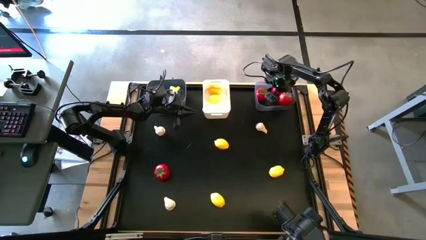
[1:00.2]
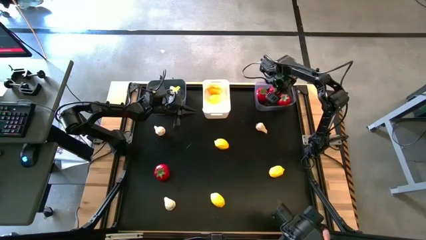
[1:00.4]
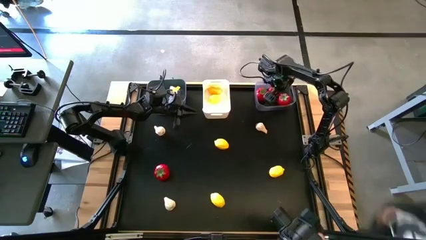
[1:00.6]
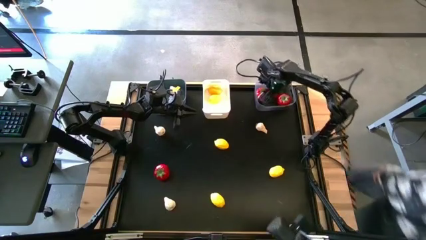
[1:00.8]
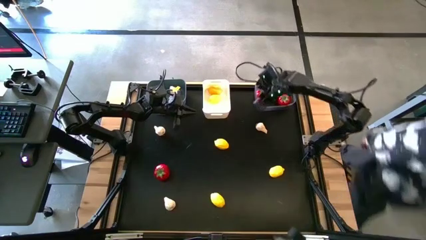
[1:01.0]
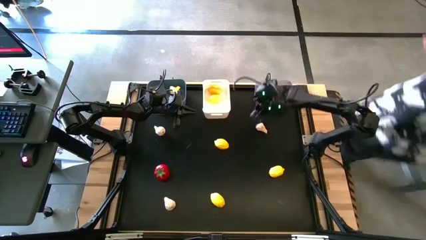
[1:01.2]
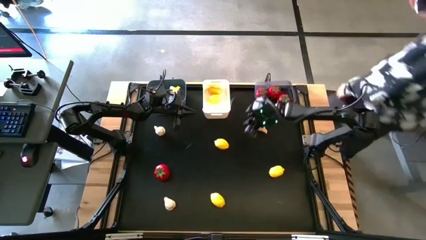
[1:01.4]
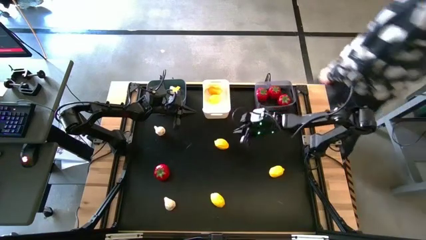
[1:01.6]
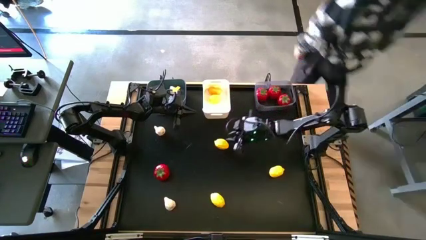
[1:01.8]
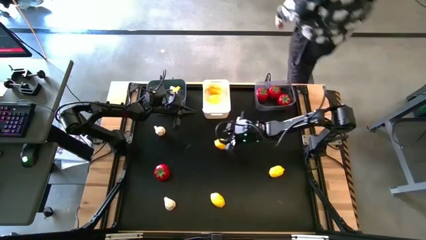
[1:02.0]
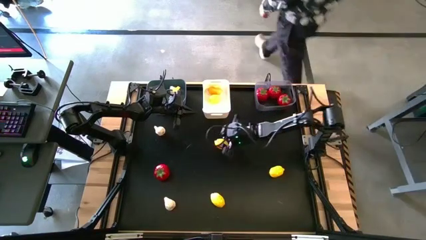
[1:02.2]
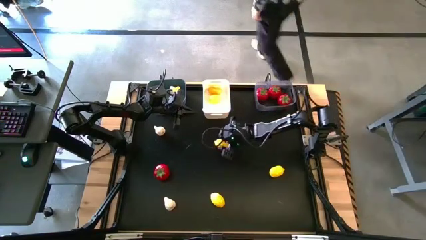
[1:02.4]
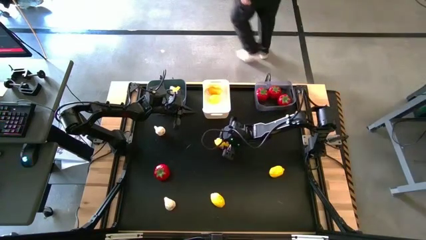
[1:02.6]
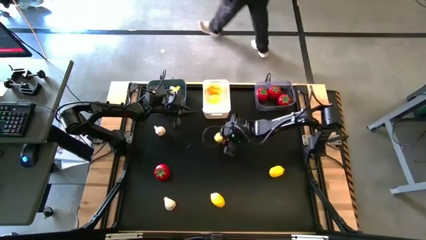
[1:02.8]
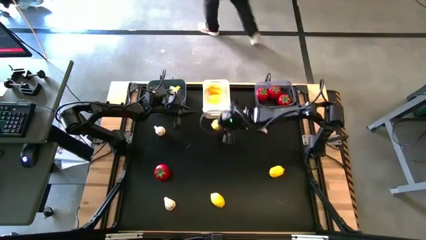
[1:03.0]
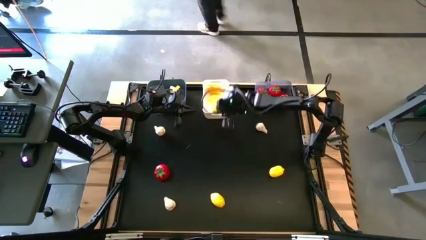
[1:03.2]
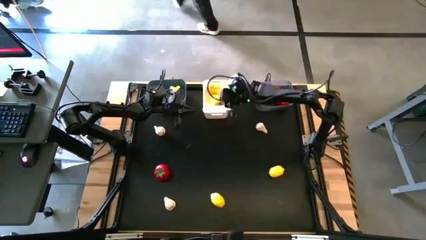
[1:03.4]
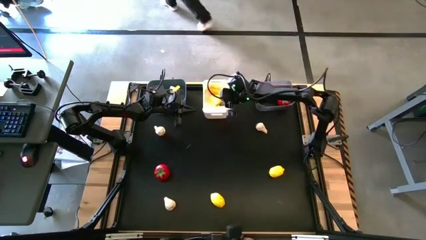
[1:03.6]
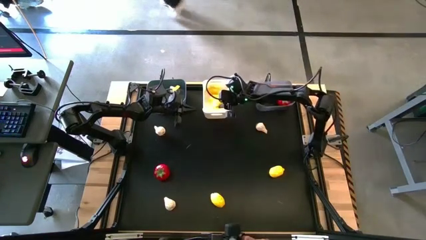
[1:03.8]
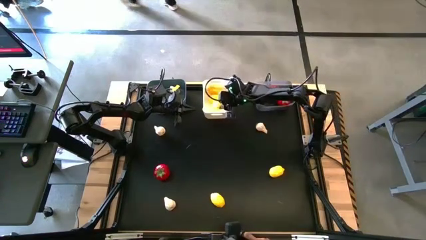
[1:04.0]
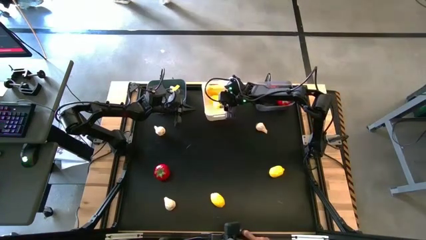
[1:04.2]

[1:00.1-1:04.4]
Task: Sort produce into baskets
Put the yellow lemon into the white bin

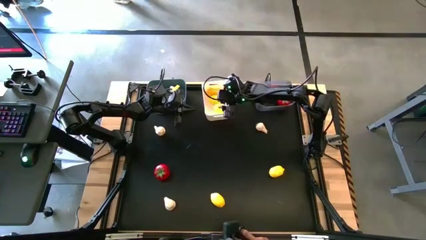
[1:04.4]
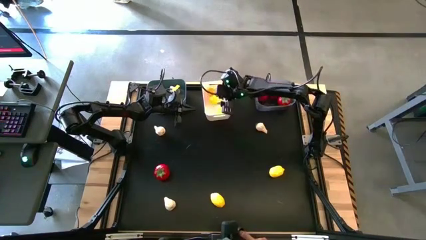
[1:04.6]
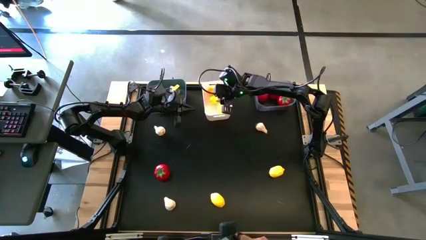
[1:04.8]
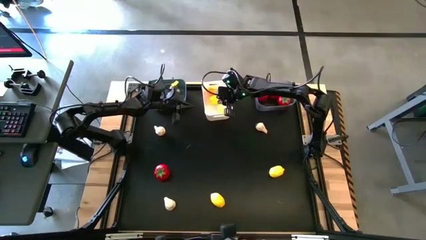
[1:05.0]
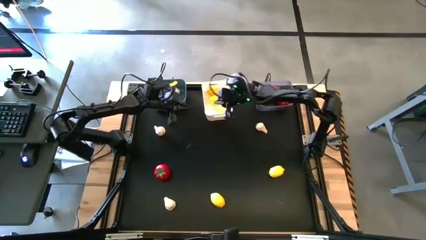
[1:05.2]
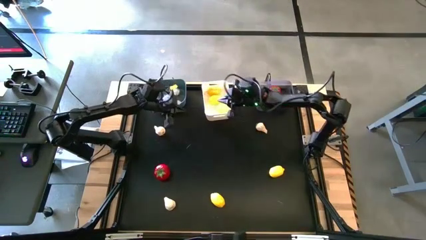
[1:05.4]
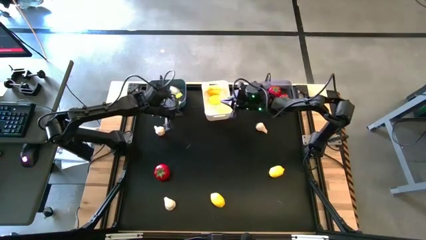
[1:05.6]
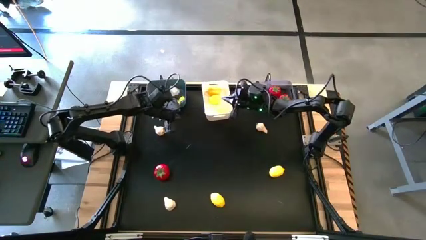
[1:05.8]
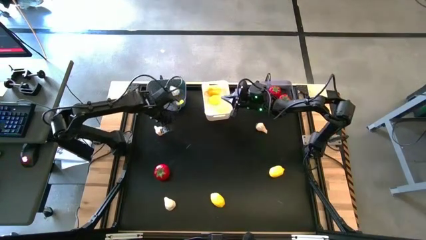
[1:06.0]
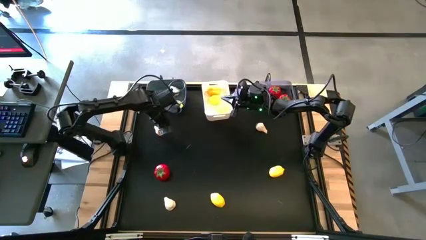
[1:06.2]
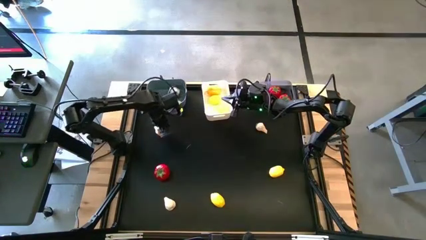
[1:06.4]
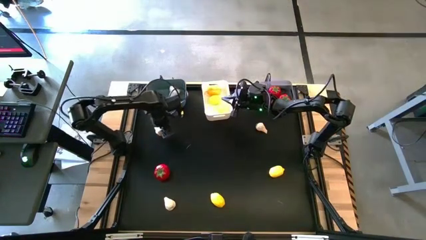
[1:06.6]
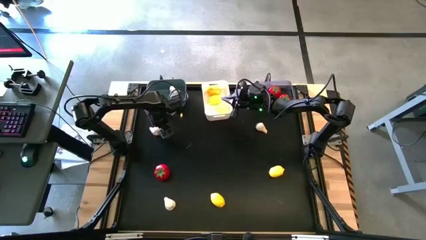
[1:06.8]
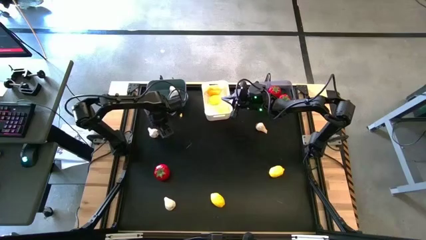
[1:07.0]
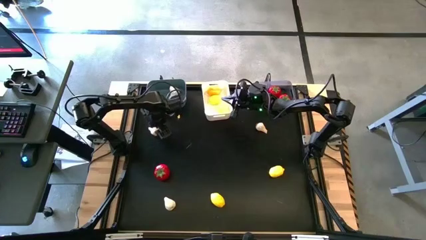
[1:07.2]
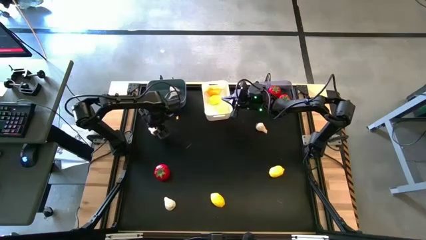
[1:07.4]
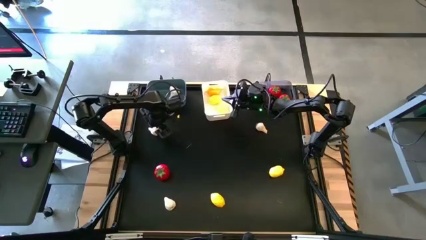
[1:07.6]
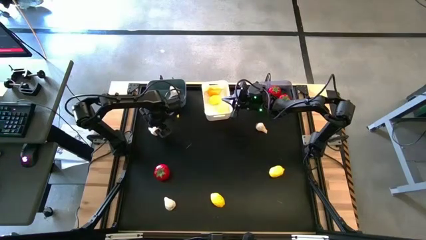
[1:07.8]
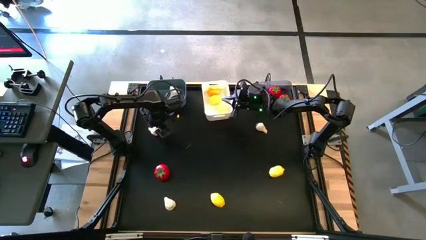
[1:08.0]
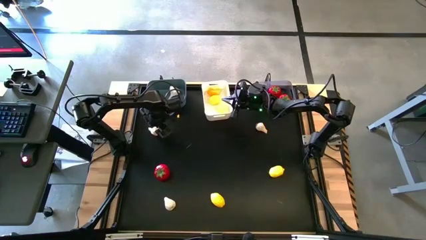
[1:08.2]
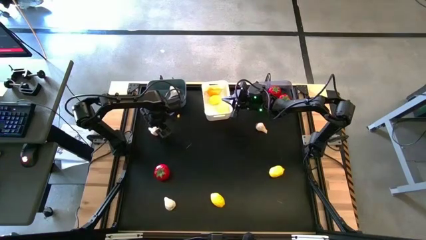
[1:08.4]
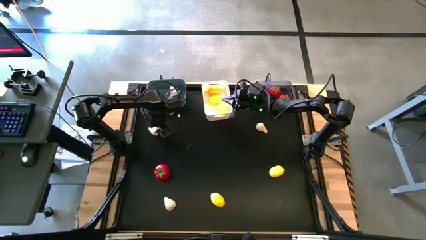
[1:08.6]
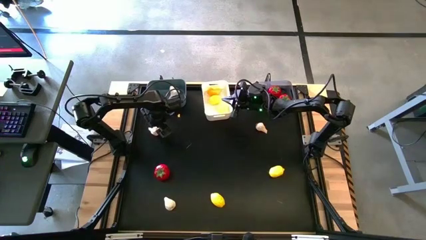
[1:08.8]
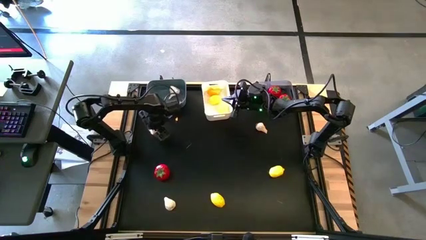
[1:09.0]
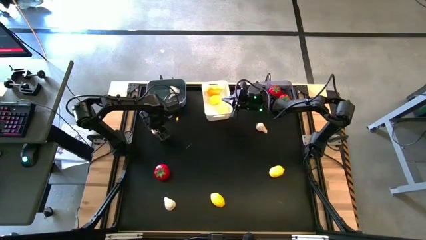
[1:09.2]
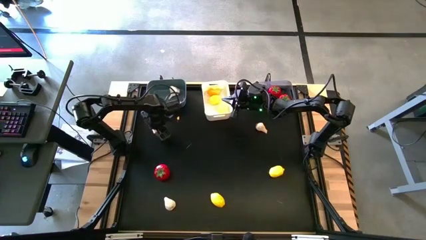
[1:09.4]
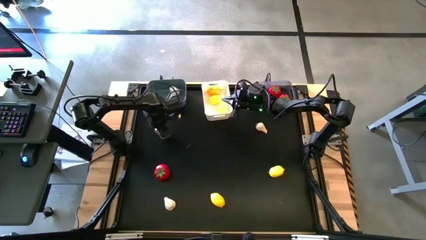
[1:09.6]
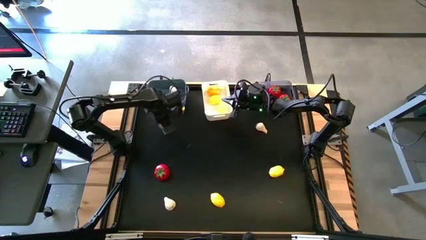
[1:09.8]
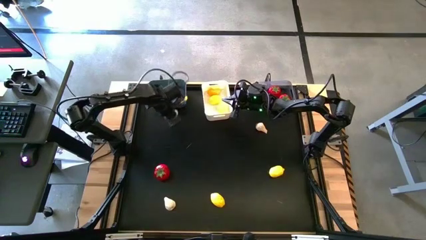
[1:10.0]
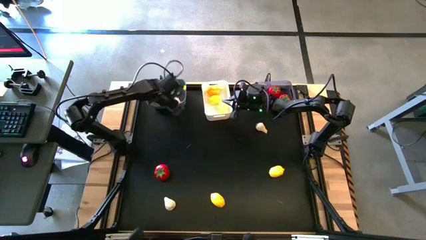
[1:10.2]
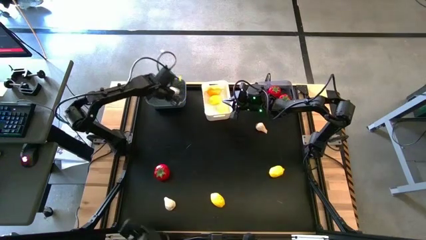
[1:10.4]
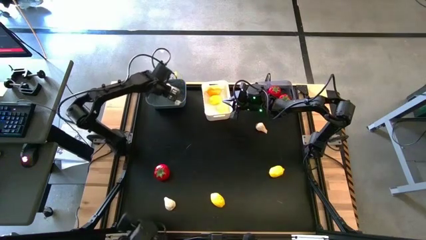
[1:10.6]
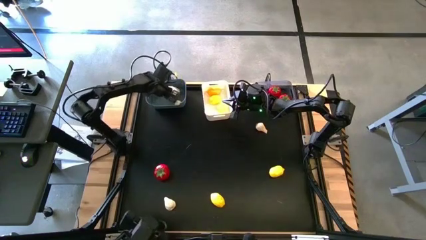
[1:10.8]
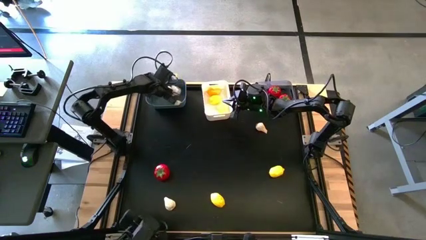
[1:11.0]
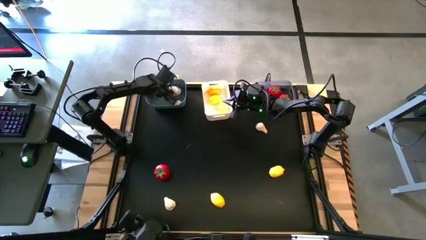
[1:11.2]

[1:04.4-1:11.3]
Put the white garlic into the blue bin

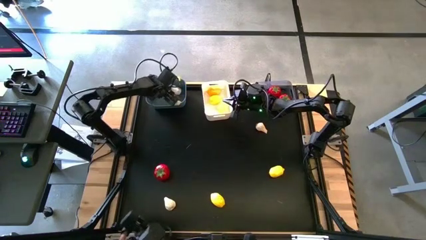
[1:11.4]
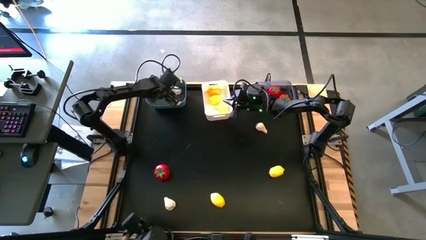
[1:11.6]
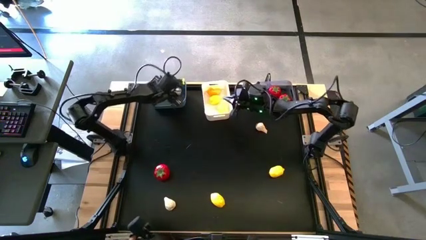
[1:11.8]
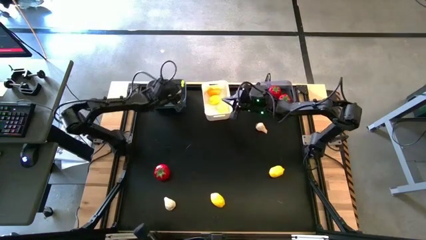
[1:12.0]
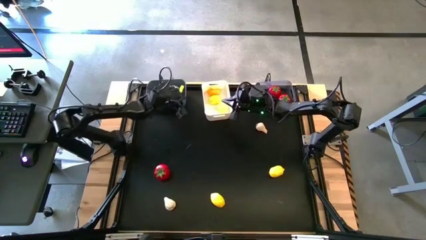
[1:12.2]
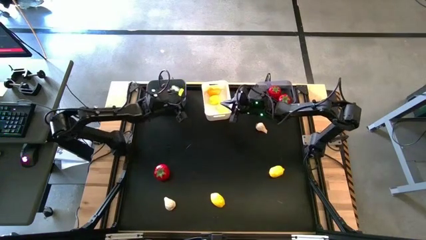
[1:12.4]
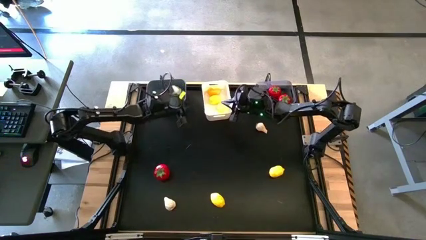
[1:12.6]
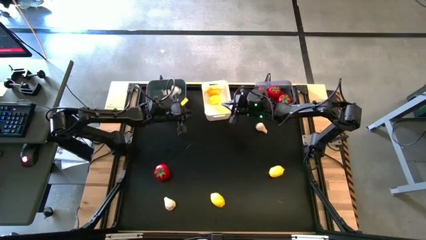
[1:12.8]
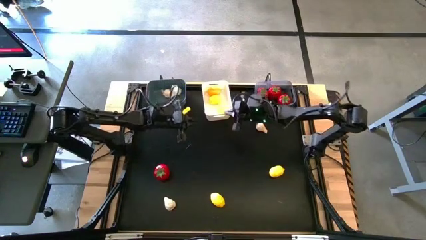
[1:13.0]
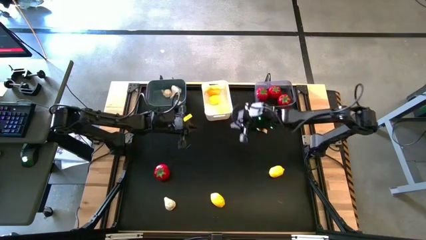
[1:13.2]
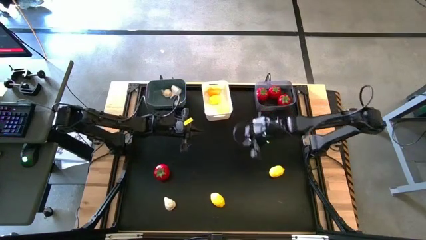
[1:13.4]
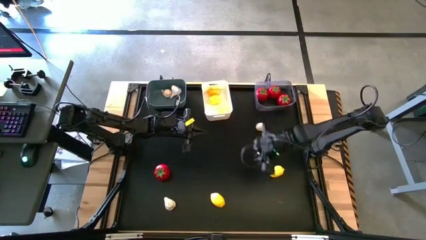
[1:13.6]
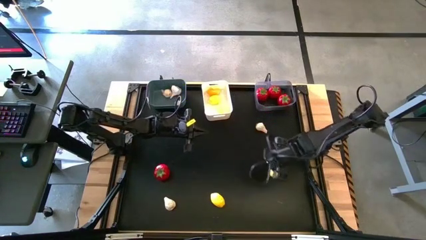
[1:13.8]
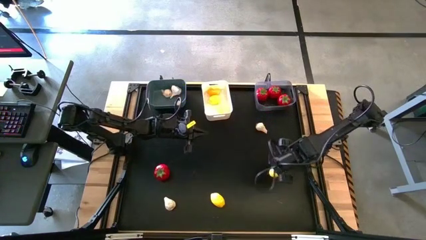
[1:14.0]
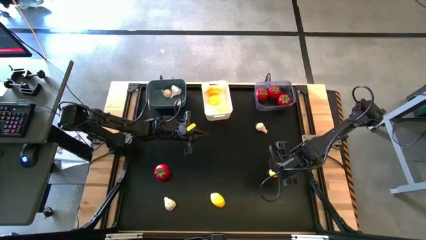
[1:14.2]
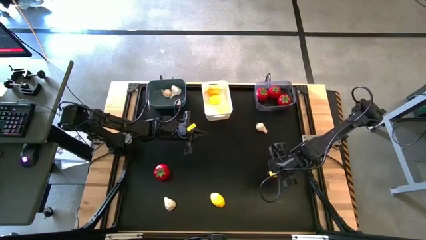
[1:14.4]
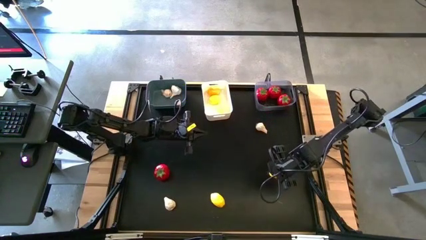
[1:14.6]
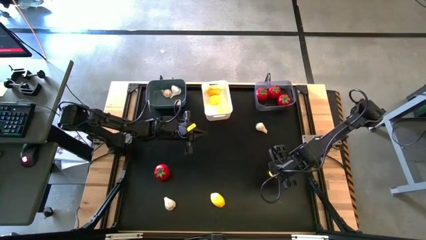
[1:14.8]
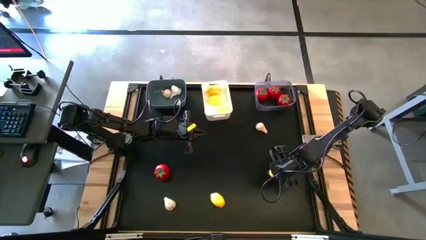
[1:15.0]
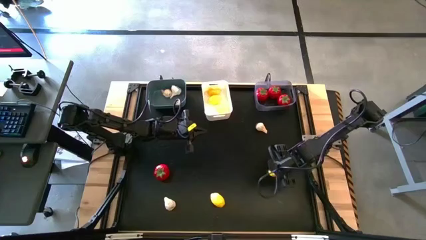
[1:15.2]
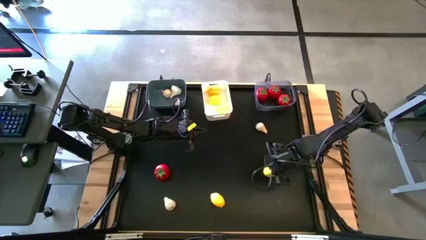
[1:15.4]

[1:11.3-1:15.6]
Put the yellow lemon into the white bin

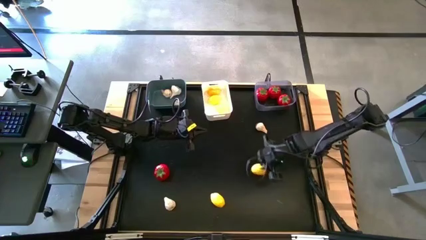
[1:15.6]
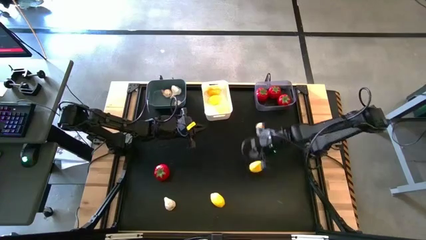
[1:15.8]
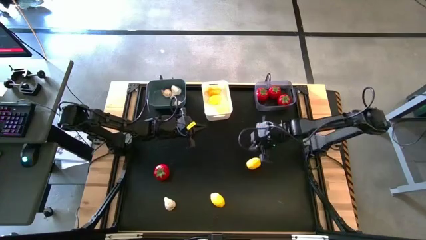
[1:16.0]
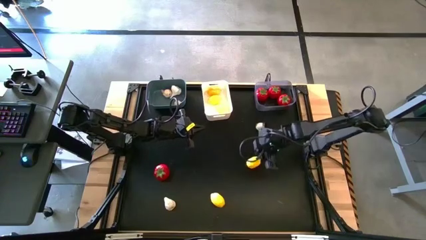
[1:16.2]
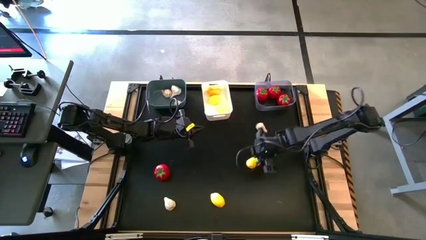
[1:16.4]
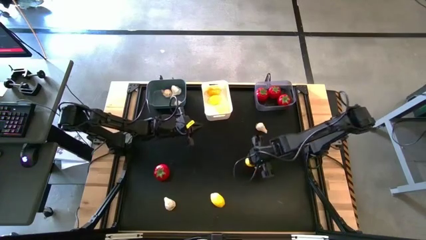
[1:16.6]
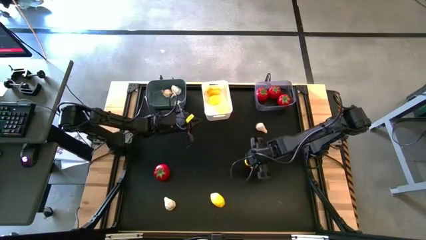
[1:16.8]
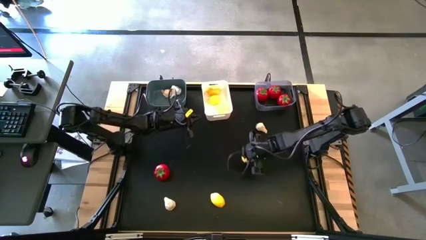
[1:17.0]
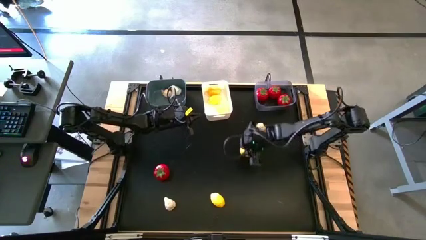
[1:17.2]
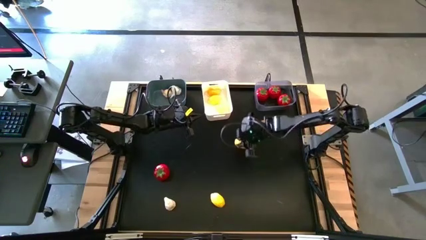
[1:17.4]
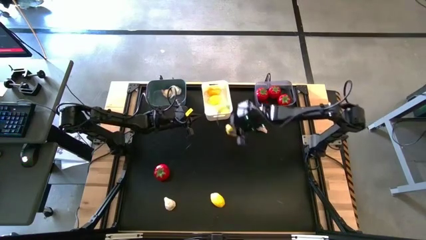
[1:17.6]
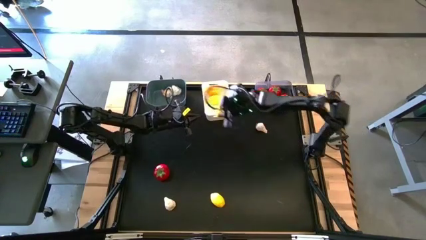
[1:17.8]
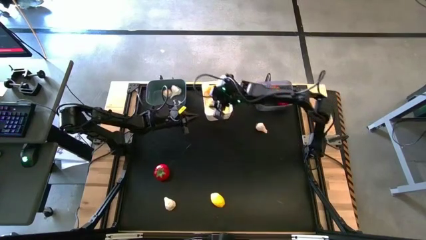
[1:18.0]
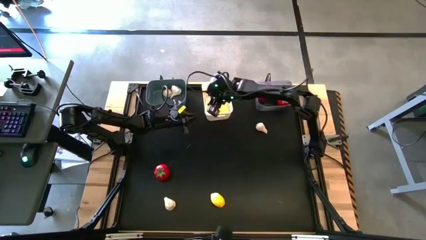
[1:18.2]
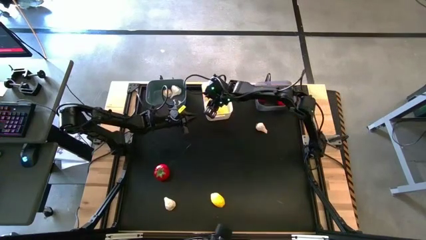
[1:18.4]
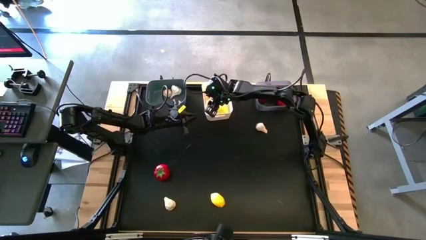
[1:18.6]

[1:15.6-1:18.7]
Put the yellow lemon into the white bin
